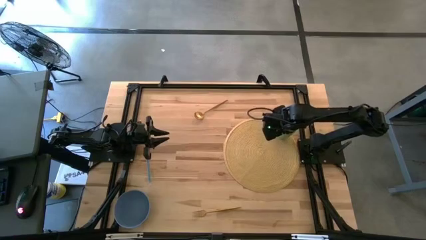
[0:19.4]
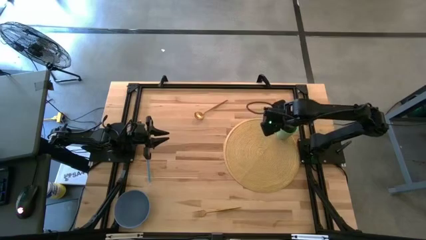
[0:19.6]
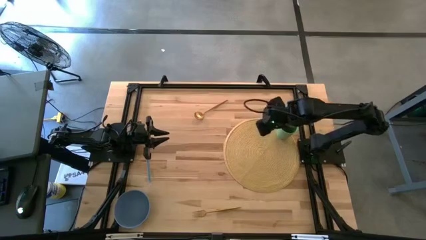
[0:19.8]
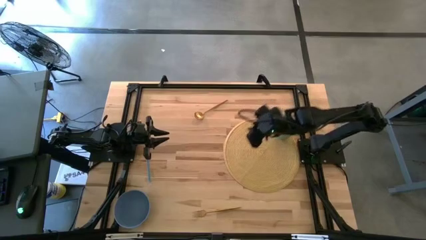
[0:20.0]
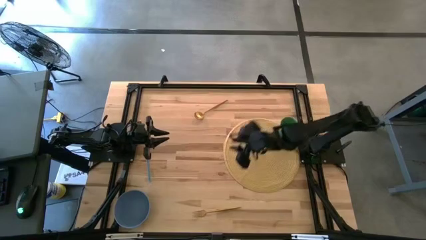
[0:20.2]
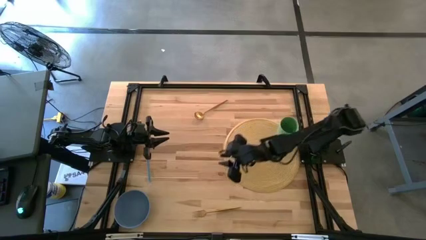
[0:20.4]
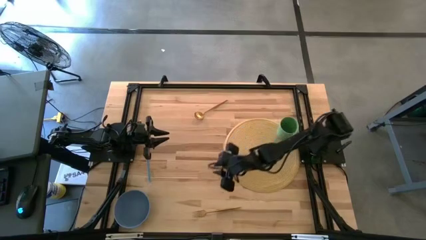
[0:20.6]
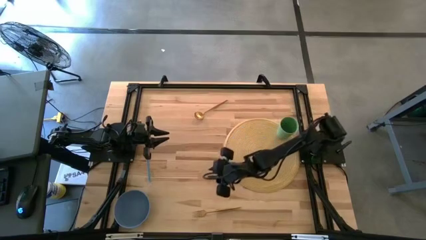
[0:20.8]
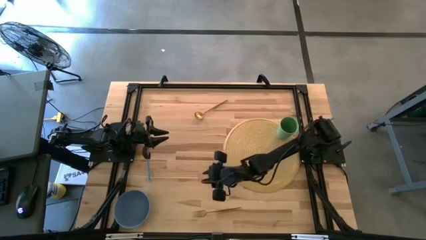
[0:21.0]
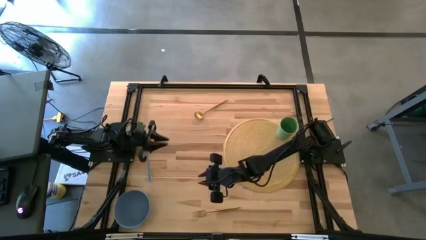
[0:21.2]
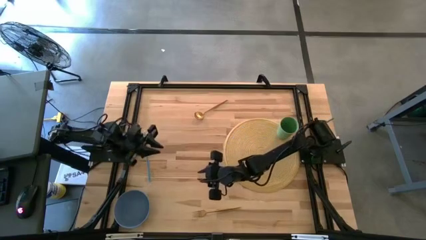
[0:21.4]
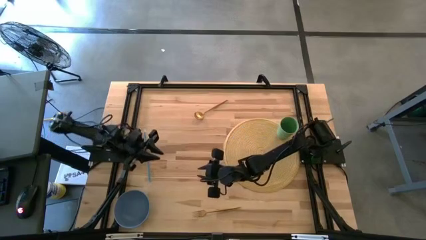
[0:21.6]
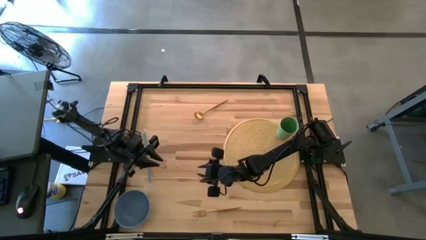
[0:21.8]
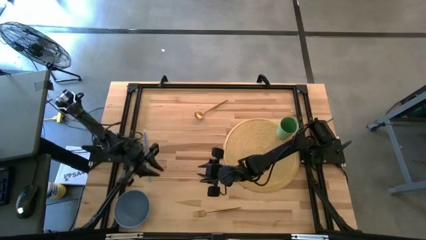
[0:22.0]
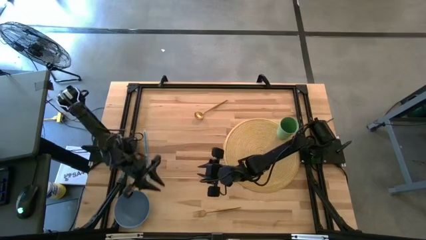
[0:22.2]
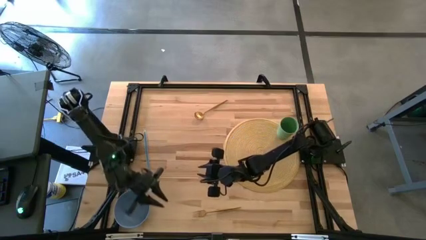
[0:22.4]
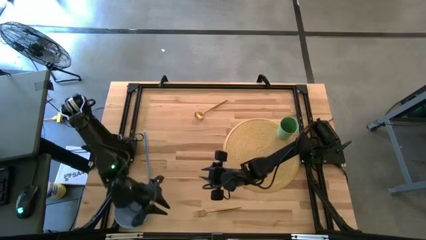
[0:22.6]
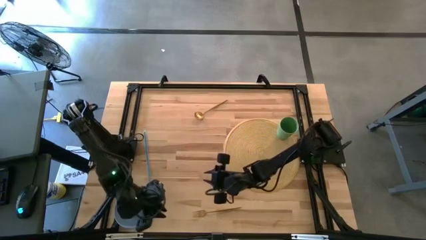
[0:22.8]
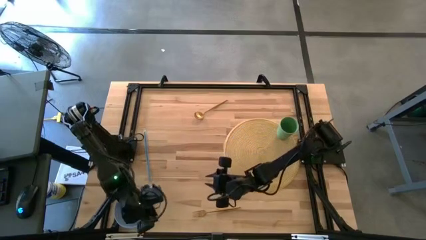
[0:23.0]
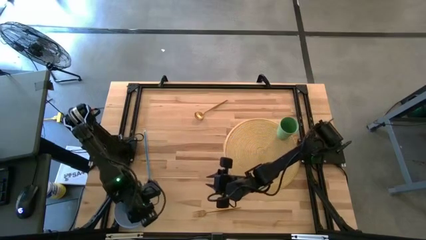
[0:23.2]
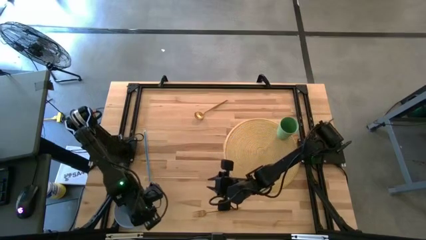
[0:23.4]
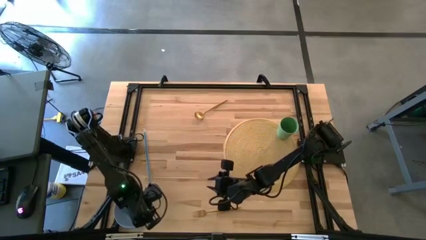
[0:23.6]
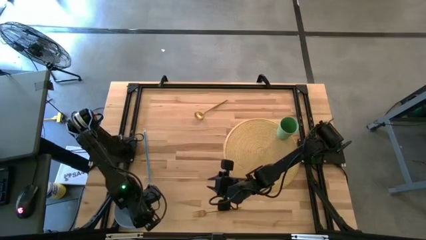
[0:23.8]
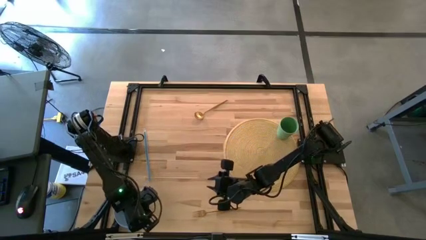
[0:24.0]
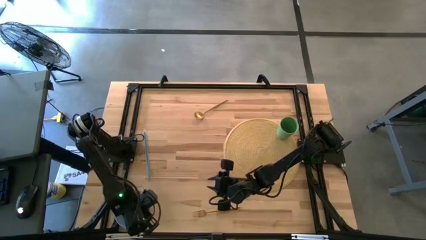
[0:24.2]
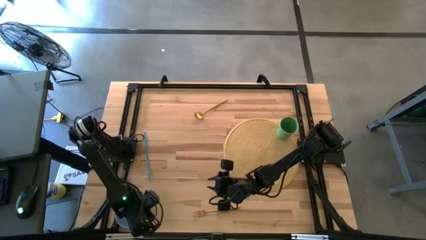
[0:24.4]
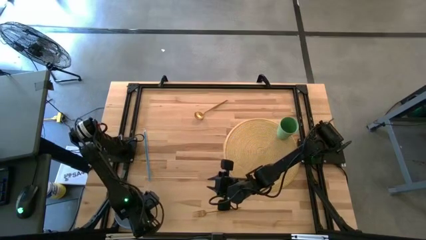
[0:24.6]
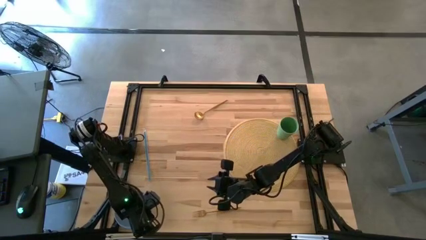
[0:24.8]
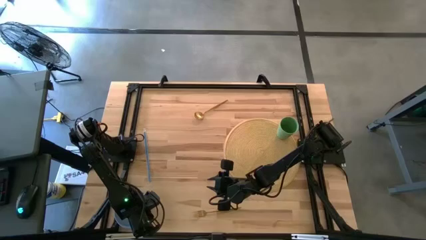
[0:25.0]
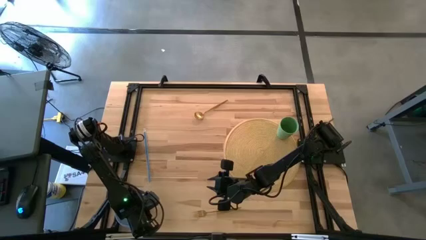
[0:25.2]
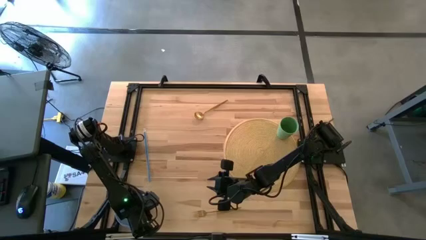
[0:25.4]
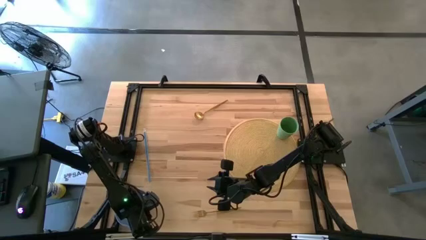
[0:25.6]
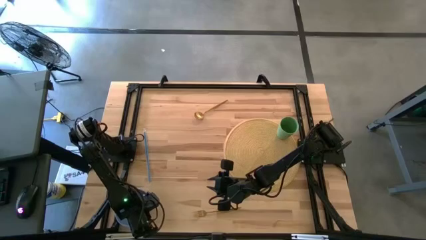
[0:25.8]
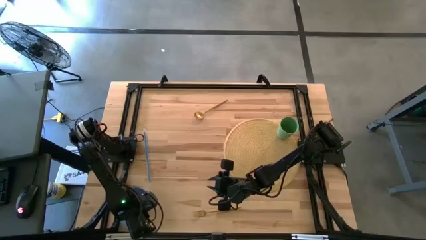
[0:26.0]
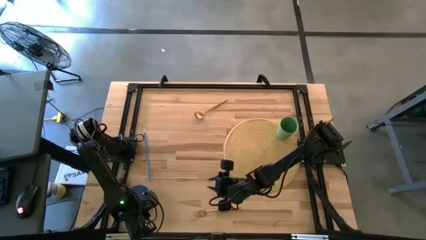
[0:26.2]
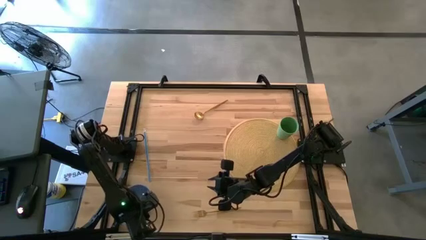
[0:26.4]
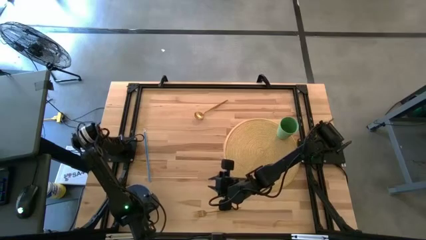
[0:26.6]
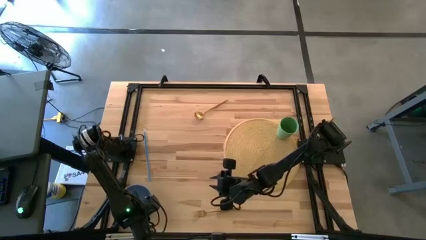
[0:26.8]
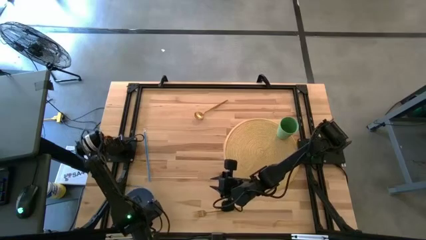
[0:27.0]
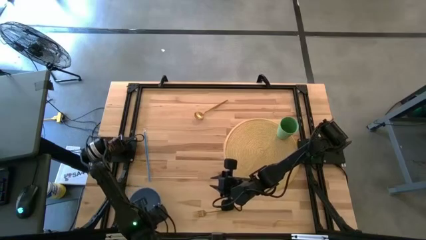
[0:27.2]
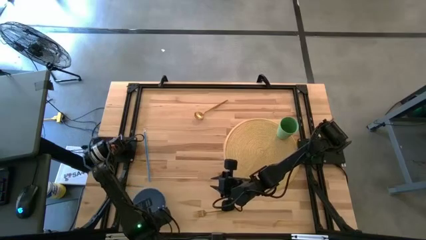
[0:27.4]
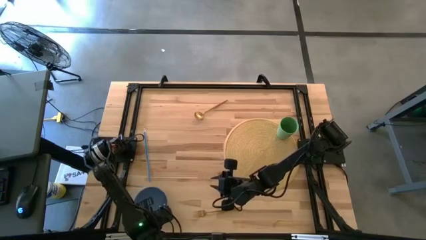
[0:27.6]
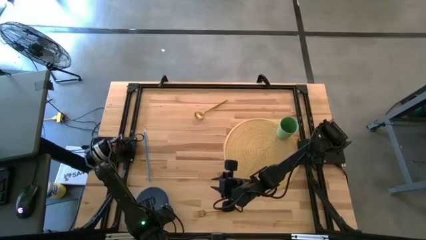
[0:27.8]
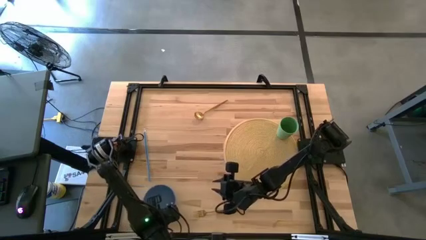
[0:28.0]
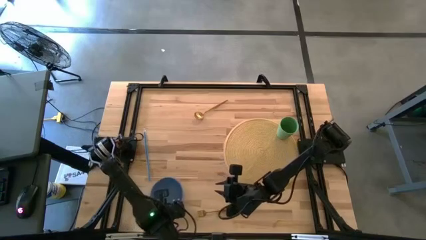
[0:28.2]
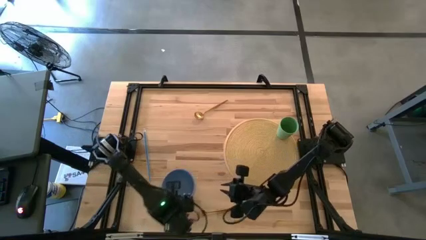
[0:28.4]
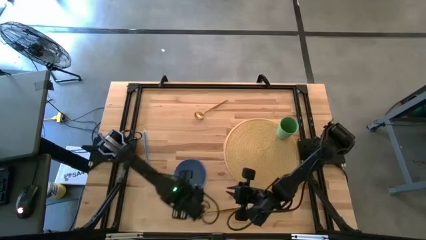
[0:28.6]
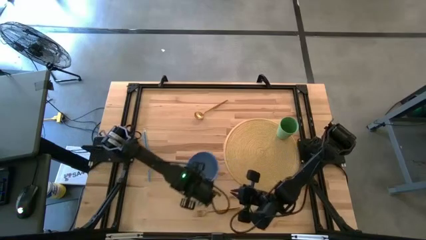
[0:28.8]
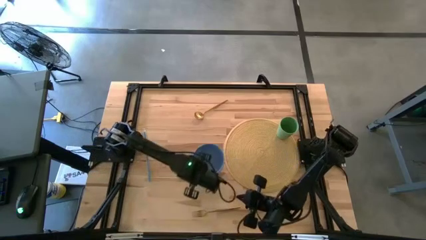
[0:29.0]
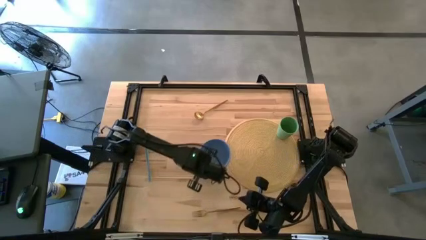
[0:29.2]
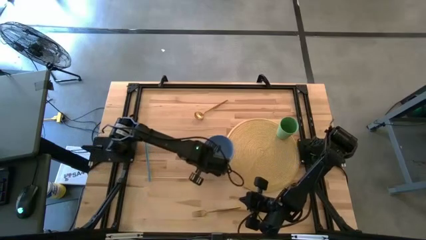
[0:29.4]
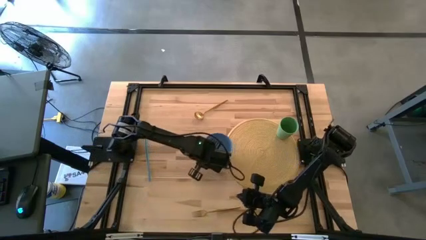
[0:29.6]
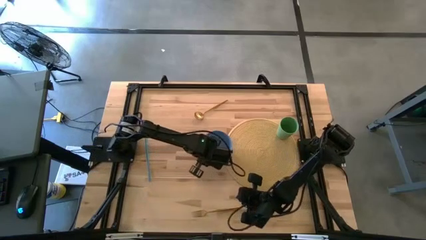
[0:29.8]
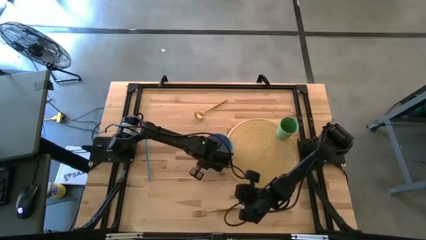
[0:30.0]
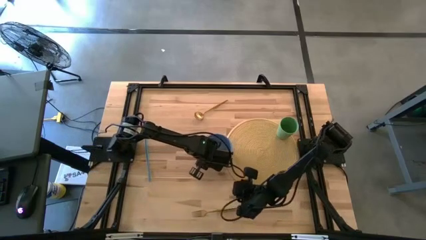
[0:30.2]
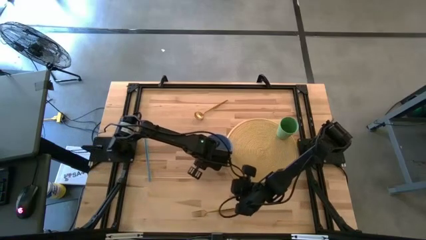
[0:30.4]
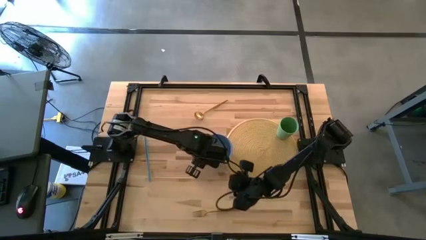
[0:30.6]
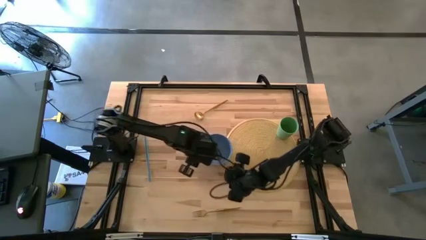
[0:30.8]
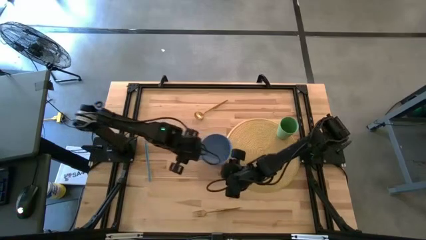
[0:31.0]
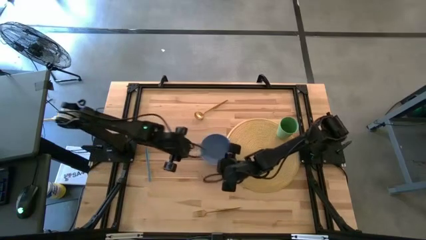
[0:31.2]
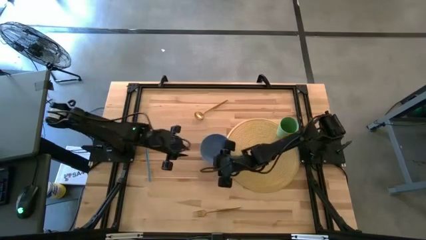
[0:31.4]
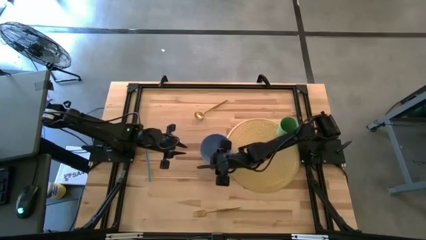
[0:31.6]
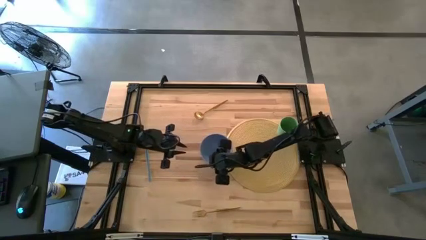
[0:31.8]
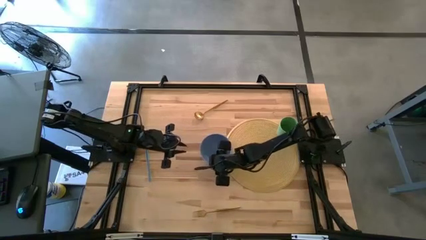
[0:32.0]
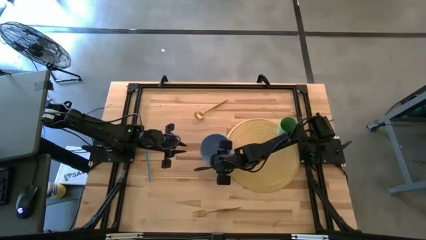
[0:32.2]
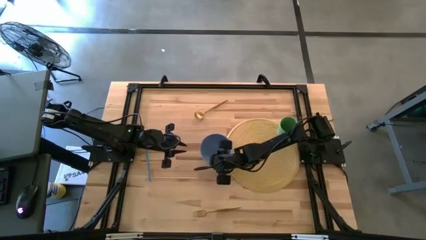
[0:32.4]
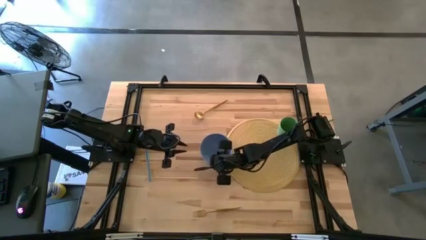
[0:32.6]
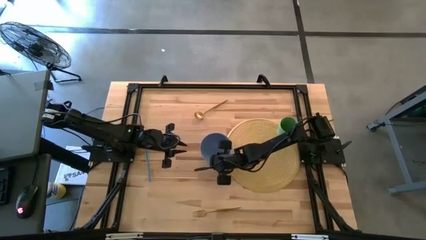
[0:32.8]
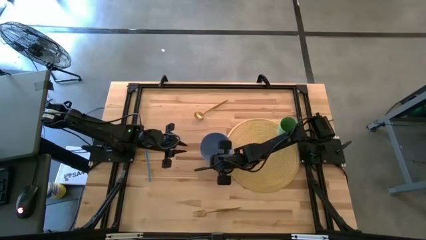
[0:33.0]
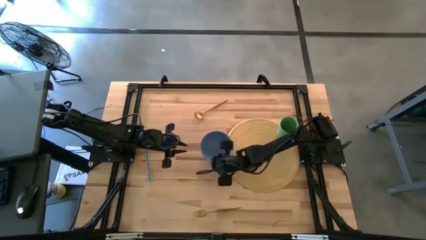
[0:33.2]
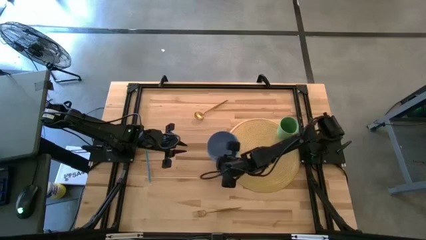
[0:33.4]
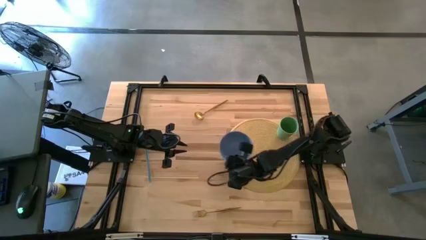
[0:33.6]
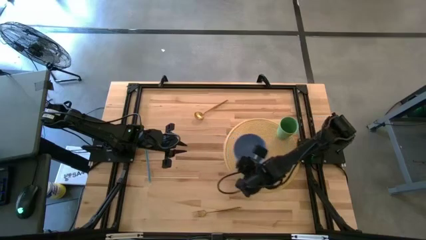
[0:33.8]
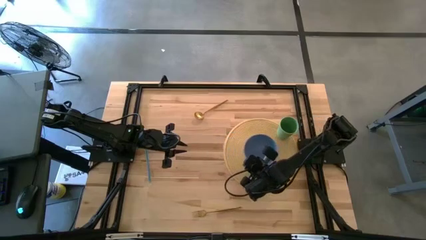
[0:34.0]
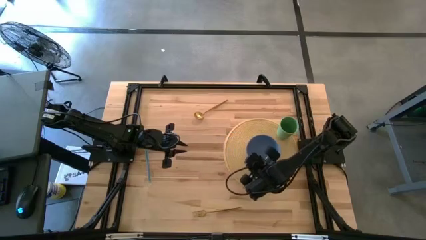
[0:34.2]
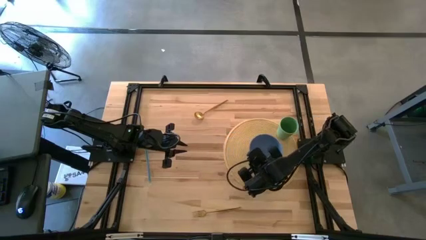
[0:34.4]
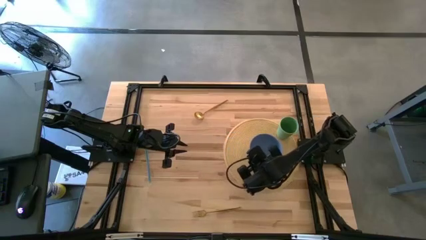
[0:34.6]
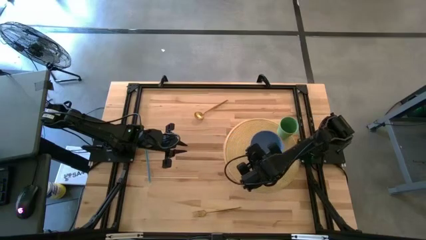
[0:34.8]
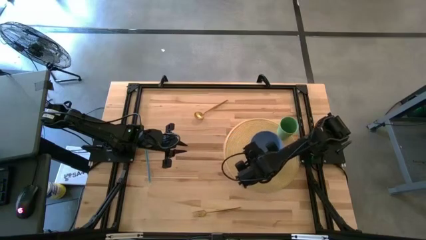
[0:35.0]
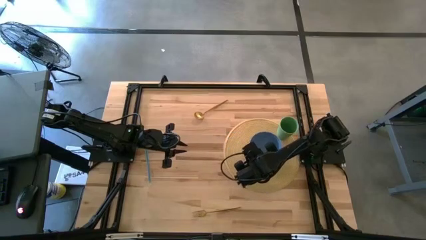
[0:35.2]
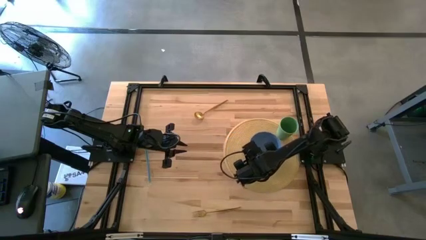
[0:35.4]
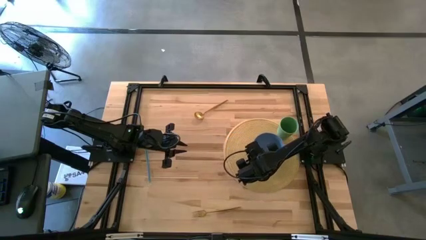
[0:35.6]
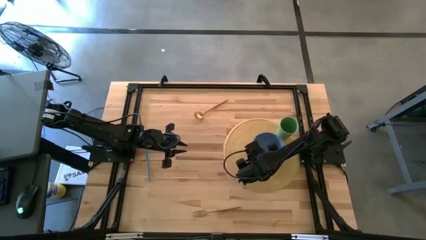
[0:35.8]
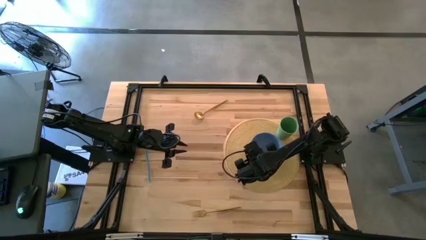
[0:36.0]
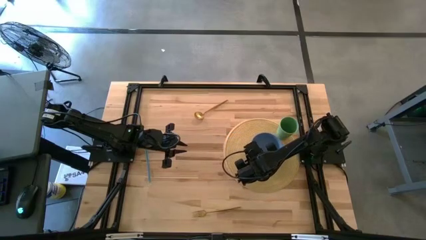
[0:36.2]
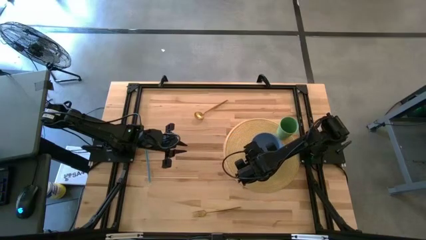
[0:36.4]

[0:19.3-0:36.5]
Task: Pick & Place Utensil
Put the blue bowl on the brown placemat to the bottom left of the green cup
